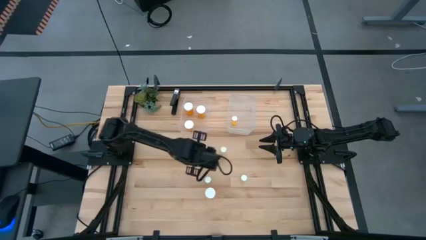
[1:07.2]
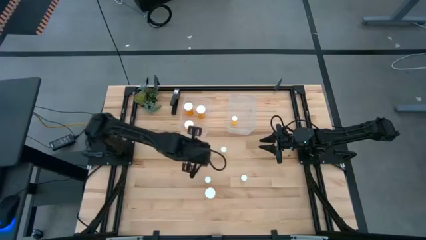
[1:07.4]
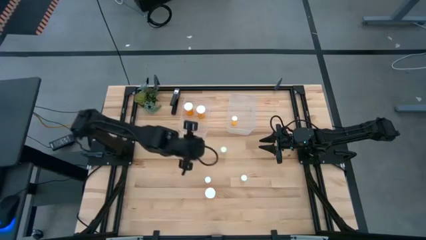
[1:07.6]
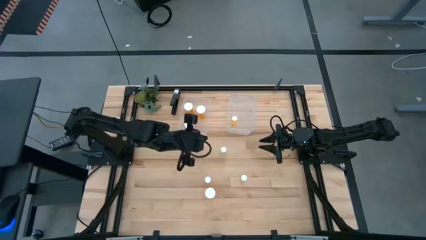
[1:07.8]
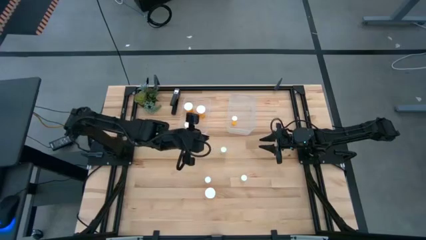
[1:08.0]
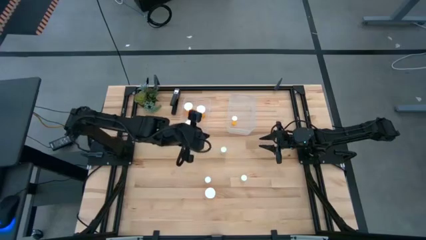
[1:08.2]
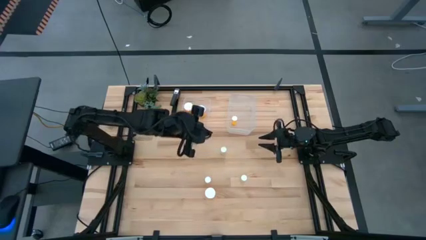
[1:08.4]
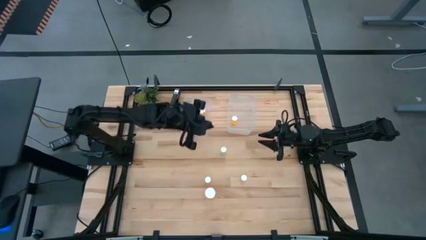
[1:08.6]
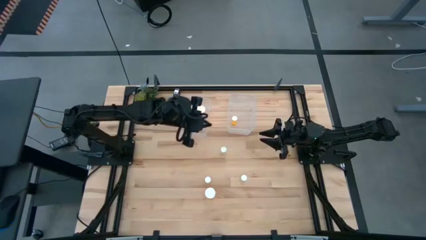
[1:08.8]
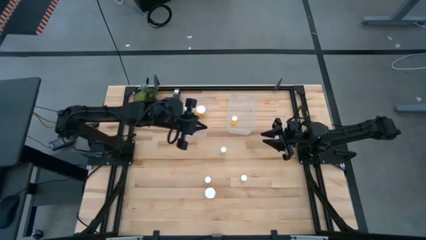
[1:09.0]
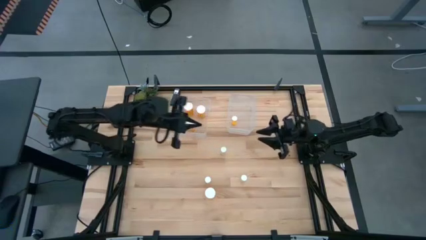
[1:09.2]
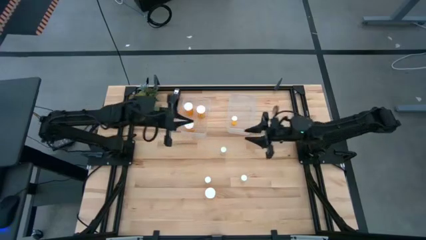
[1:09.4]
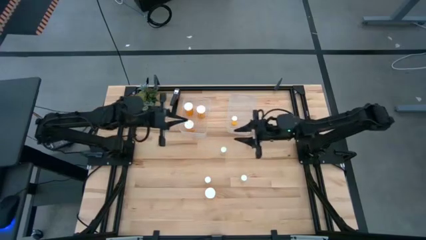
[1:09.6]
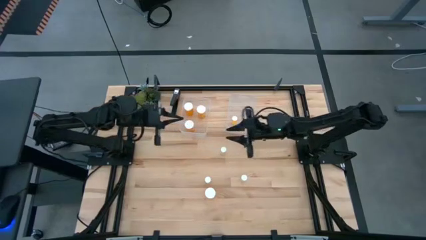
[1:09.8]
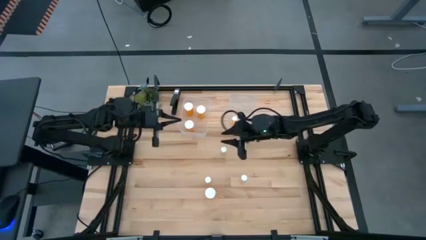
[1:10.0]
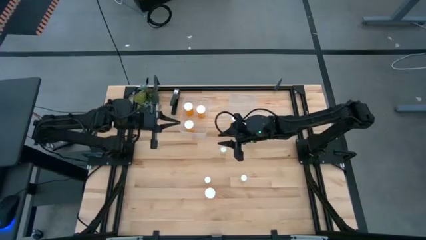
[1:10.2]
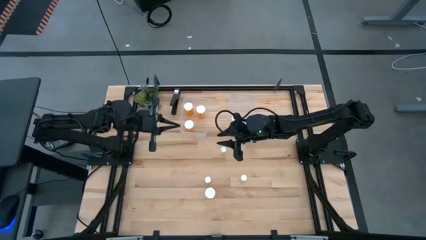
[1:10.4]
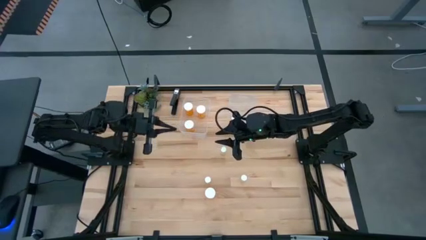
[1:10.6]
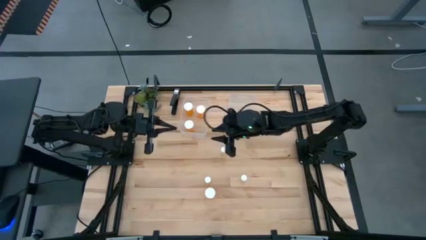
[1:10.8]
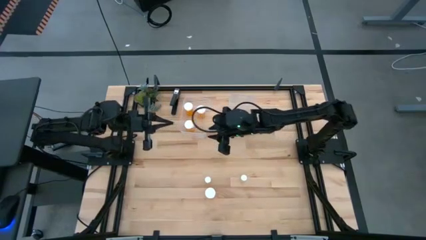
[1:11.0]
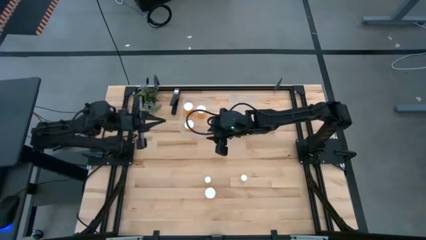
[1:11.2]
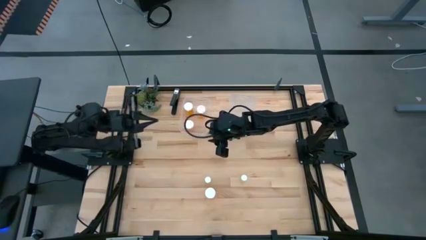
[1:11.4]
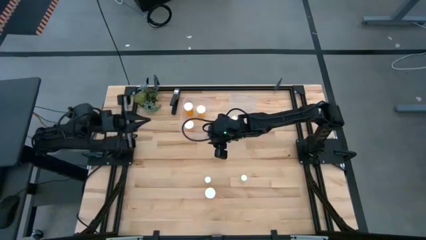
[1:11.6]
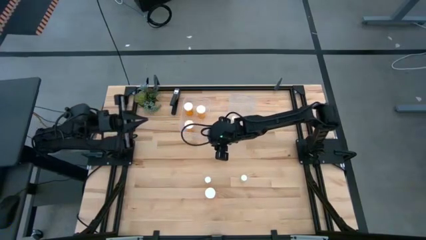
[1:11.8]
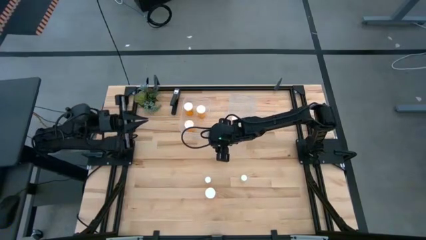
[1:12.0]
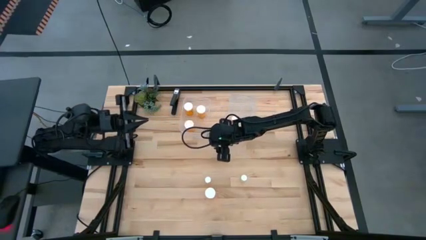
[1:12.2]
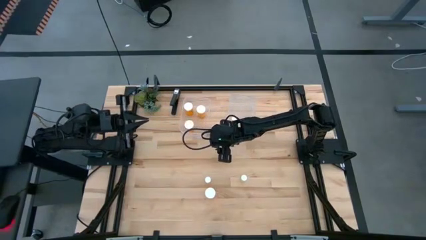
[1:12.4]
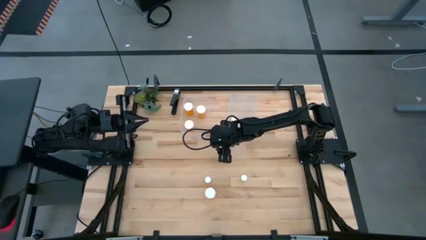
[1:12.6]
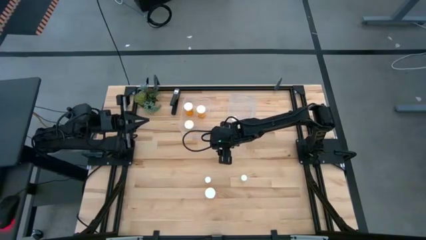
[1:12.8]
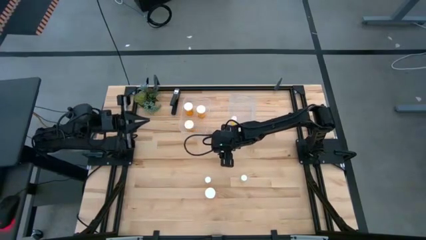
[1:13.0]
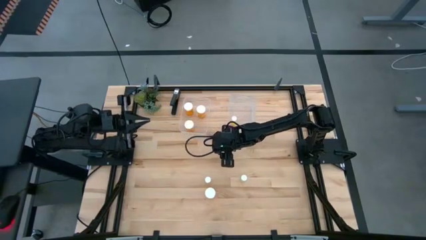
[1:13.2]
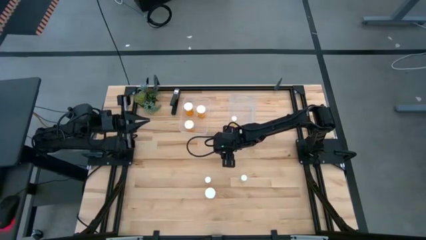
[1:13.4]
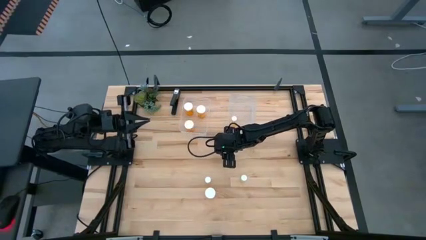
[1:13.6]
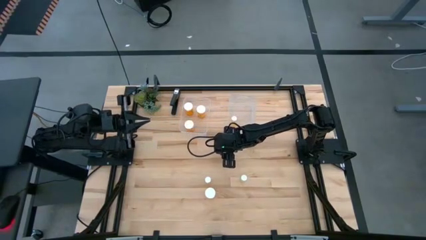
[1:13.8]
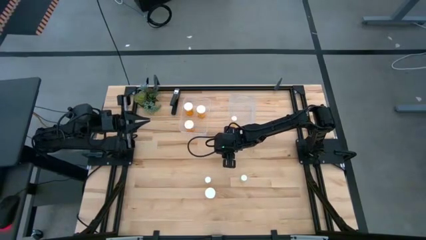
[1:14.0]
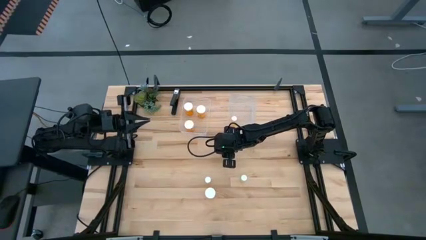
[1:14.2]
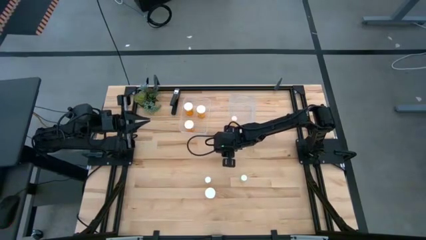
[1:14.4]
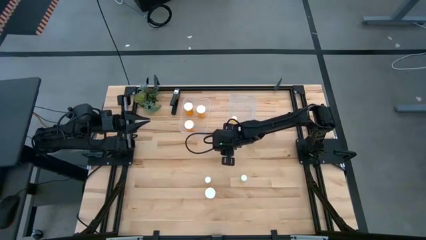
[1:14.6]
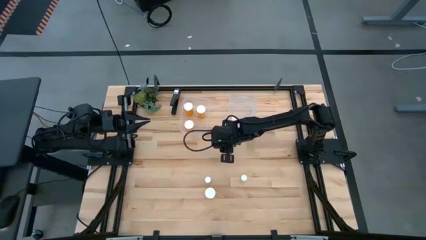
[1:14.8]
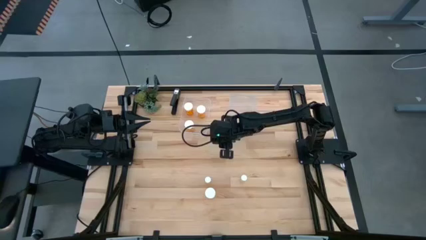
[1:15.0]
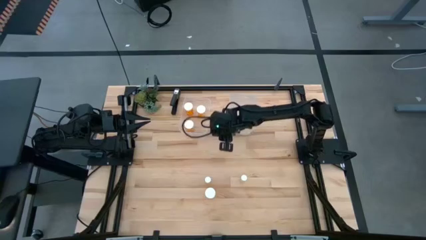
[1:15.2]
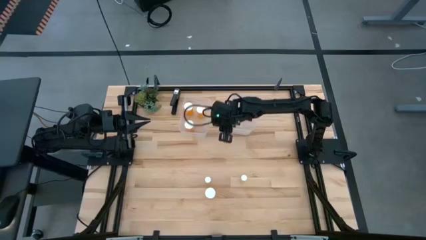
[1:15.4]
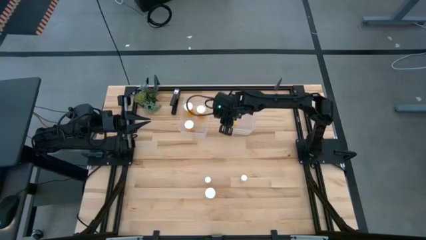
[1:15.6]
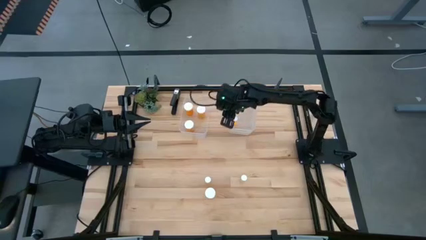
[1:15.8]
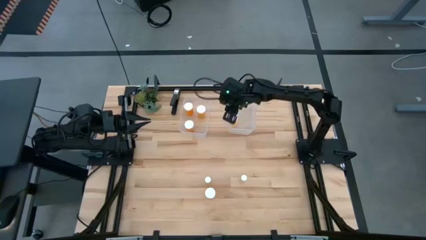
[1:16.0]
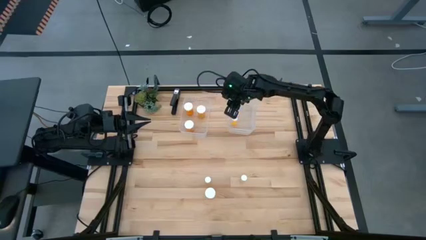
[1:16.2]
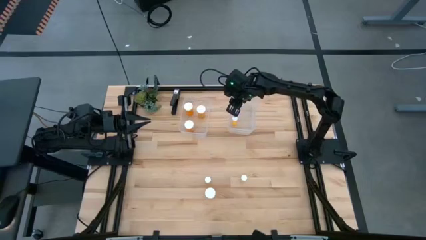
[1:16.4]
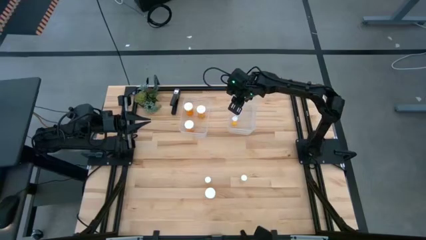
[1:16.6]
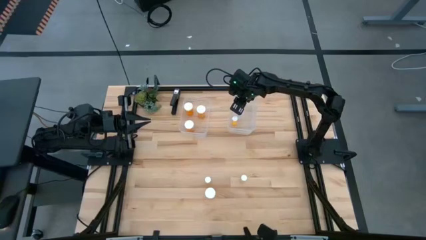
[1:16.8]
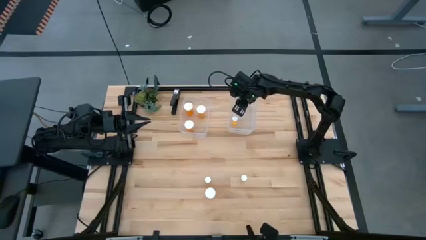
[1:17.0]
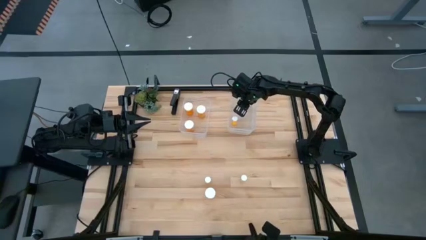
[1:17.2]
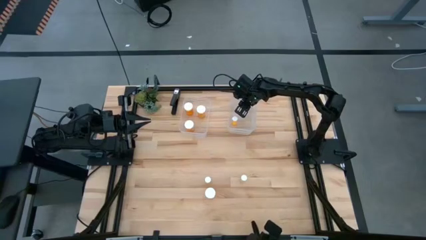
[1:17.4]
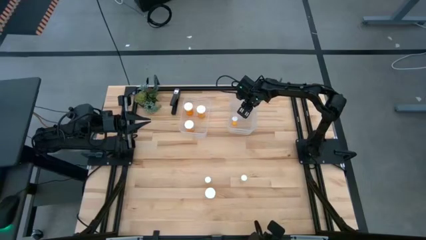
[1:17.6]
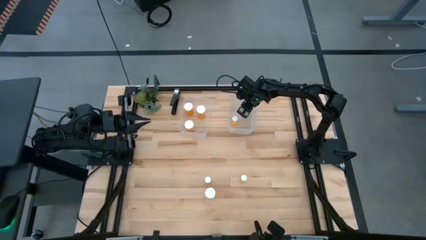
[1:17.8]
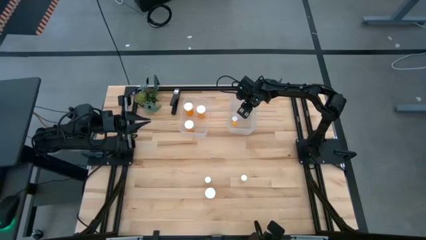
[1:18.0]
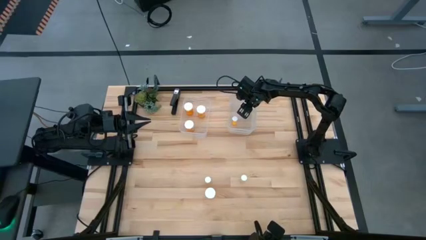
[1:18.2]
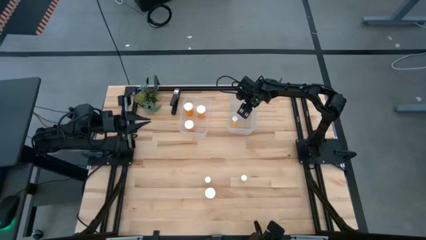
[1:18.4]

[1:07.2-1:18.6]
Task: Pick and place medicine bottles into bin by pill shape (circle, oval)
Put the small yellow pill bottle in the right transparent bin
